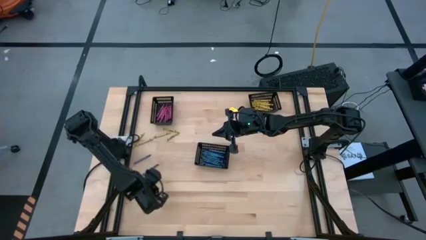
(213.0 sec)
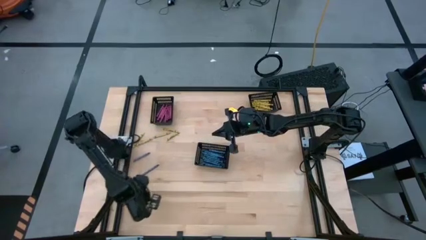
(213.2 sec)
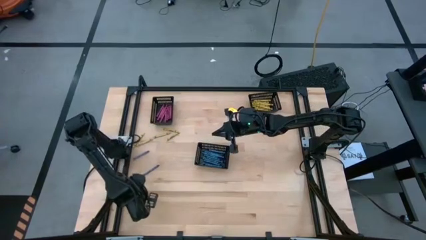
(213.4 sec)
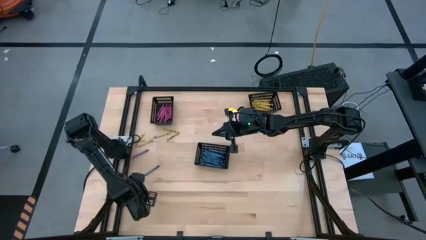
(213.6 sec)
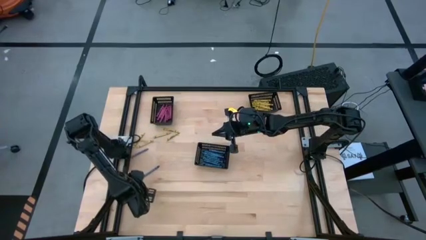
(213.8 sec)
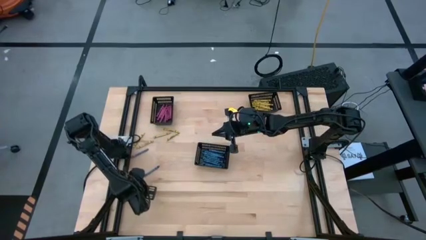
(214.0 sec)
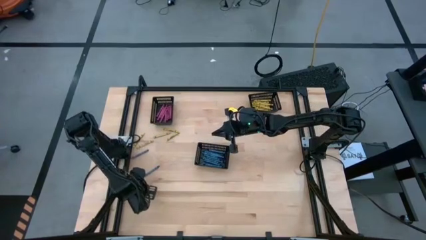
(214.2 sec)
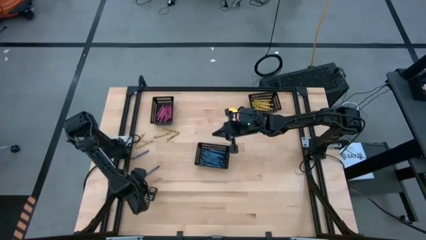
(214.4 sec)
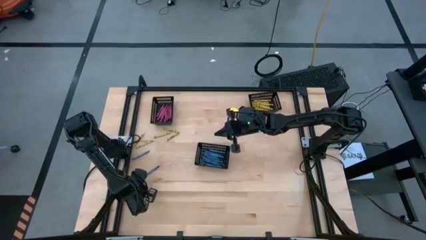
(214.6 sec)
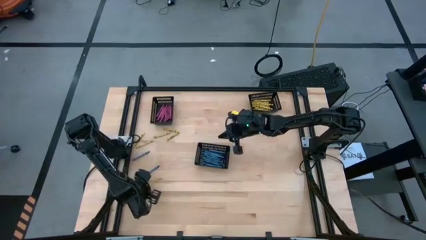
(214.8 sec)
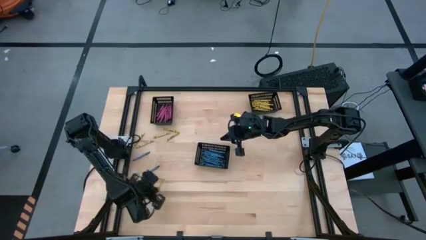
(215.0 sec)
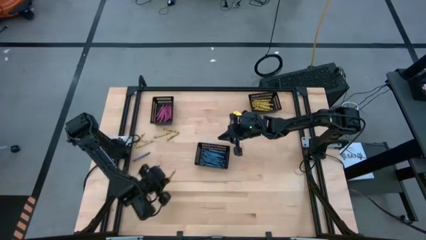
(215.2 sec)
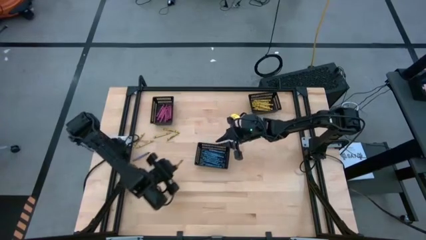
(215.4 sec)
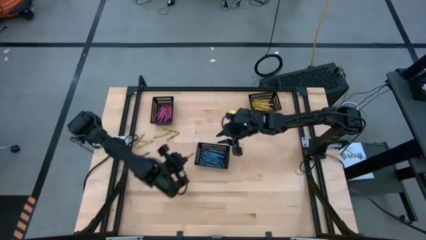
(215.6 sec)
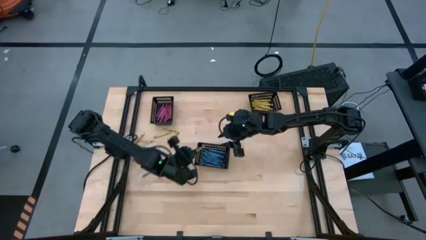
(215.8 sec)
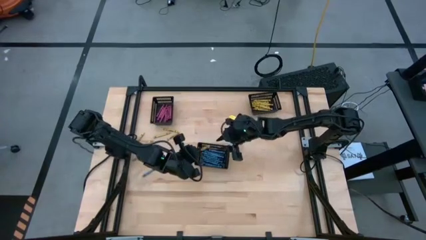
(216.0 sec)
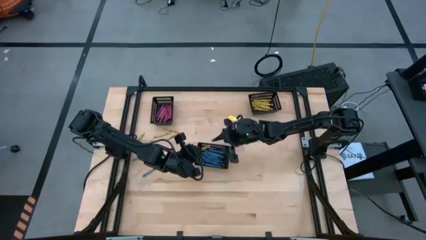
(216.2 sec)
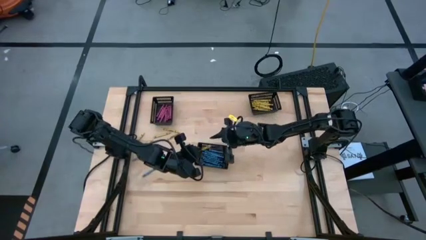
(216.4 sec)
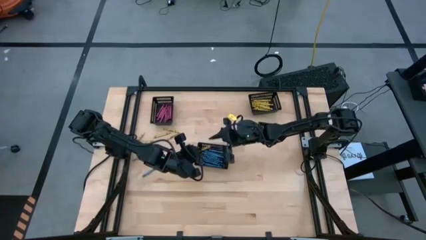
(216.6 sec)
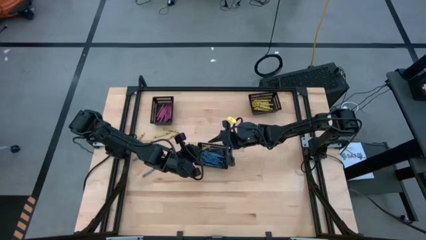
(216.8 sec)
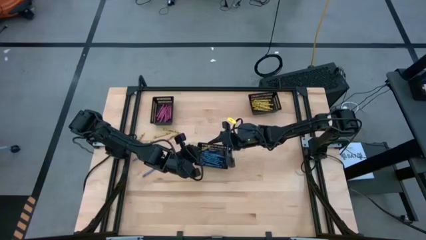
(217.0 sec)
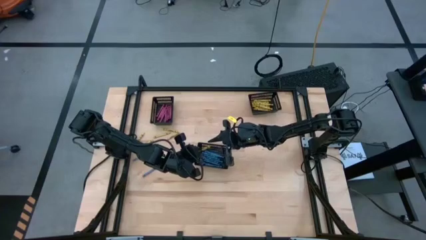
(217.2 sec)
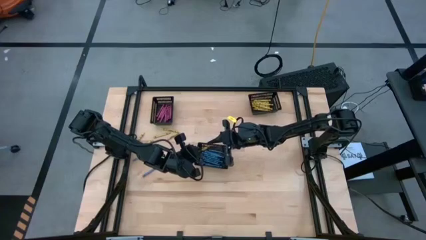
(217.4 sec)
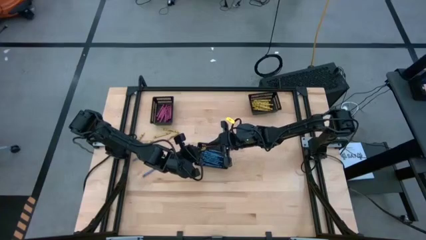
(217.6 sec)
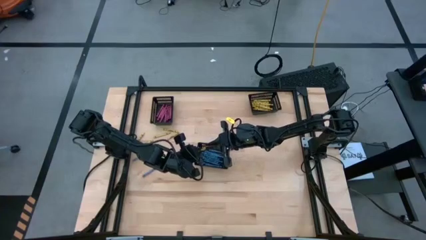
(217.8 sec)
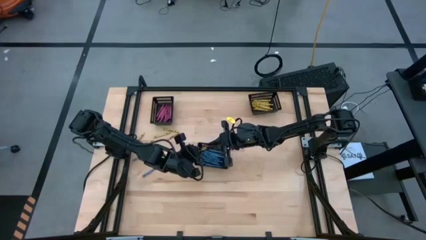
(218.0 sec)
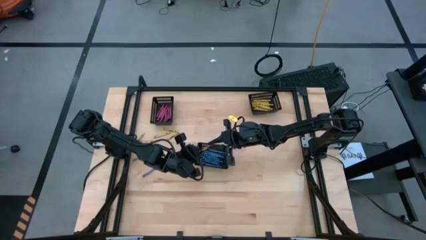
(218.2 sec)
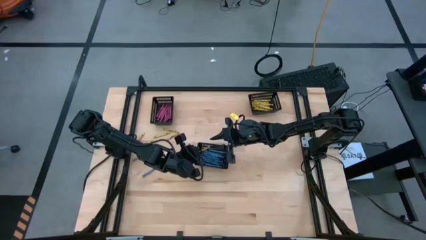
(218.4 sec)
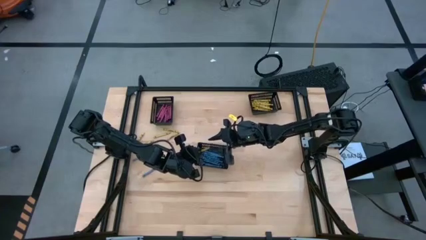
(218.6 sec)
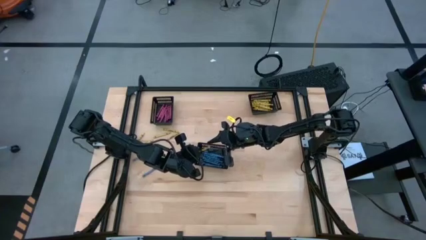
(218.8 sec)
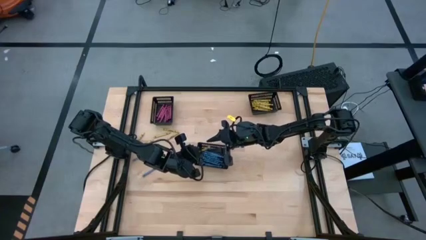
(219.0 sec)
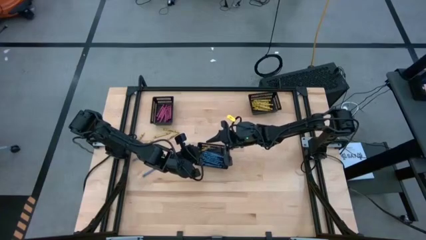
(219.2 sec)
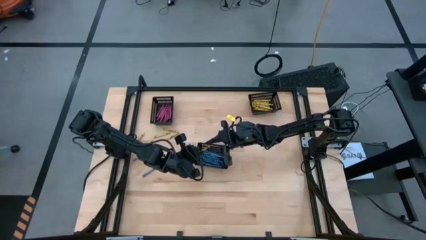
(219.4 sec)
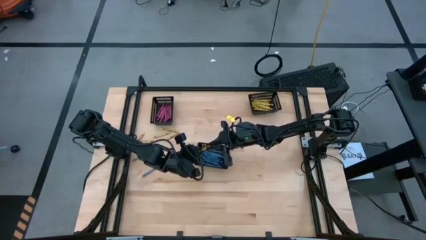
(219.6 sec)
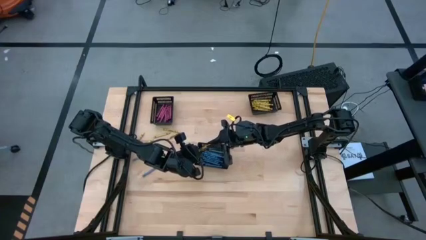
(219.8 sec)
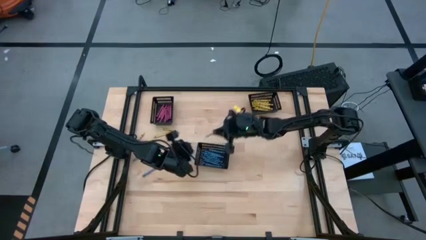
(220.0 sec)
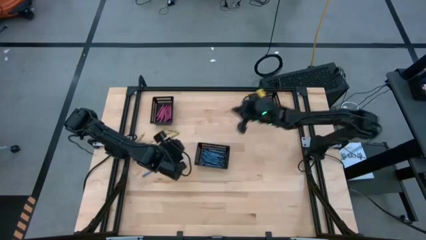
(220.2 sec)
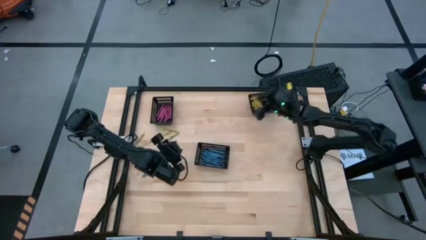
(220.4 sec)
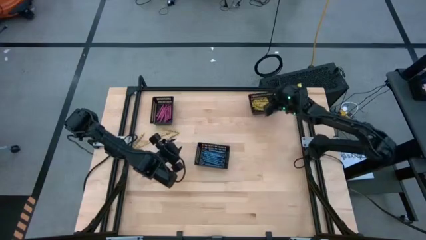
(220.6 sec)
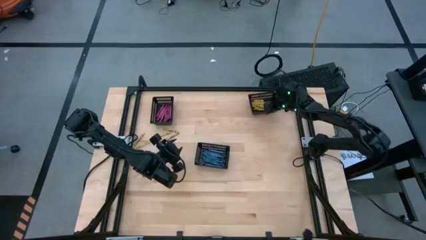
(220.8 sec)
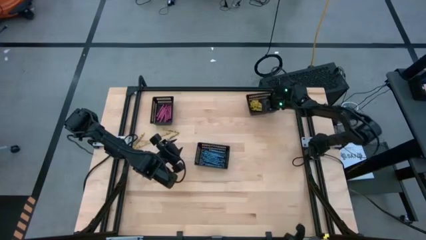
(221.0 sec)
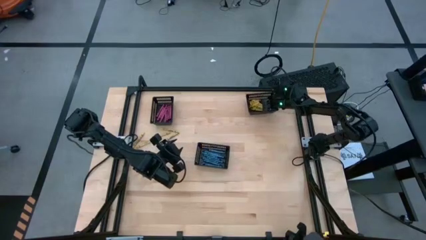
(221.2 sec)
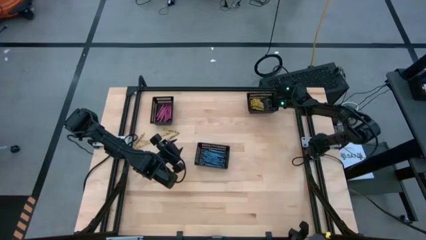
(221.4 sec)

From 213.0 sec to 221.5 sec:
Task: Sort crayons
Put the yellow crayon into the top right black bin

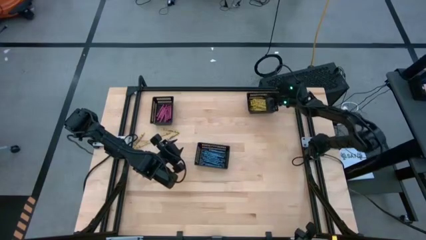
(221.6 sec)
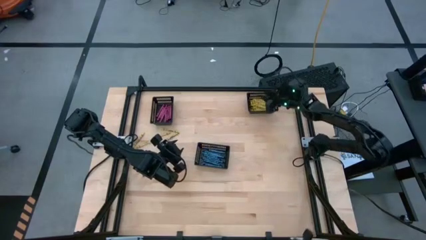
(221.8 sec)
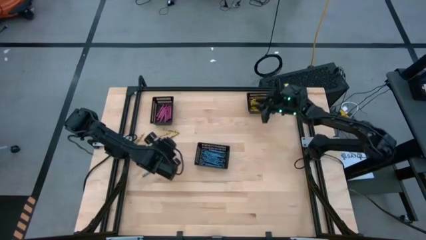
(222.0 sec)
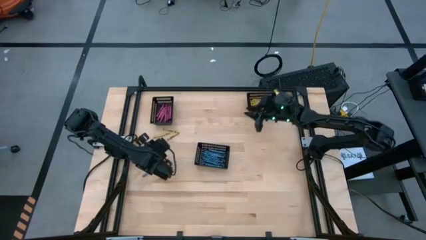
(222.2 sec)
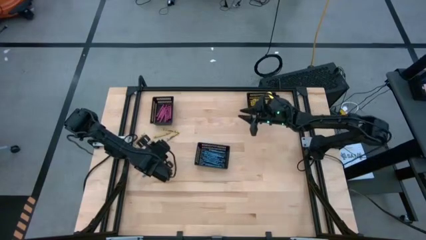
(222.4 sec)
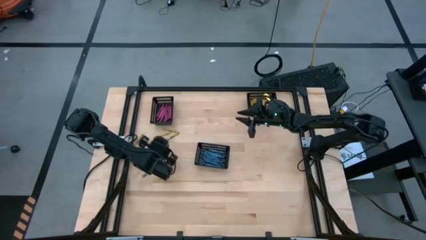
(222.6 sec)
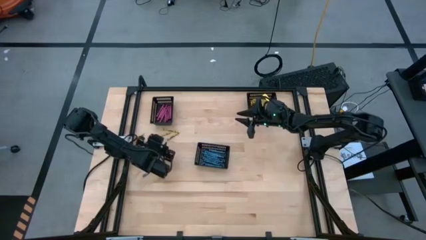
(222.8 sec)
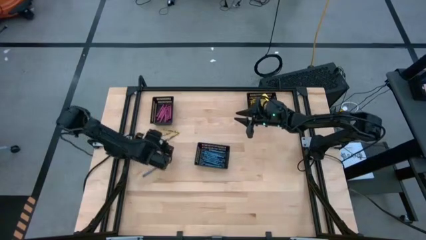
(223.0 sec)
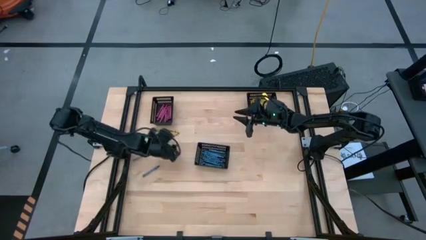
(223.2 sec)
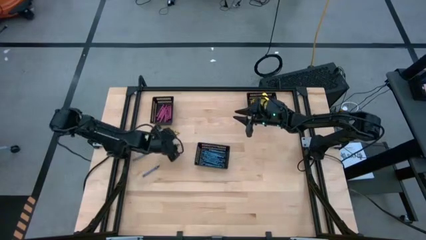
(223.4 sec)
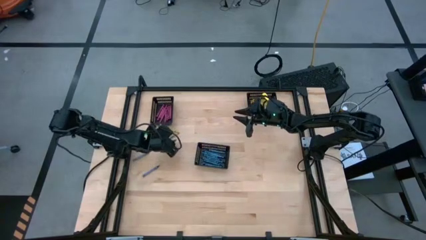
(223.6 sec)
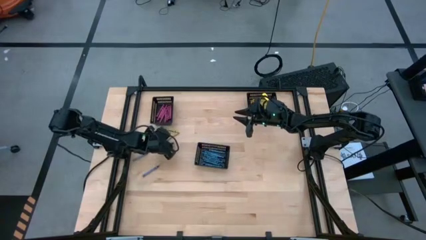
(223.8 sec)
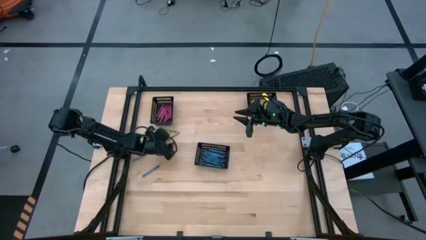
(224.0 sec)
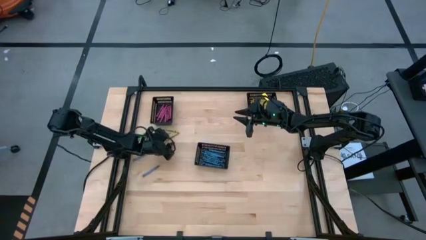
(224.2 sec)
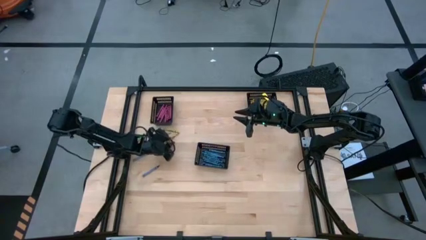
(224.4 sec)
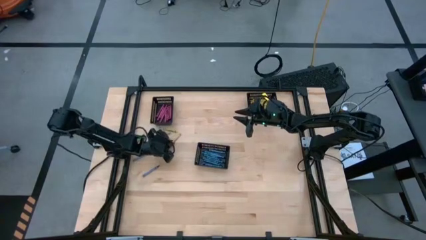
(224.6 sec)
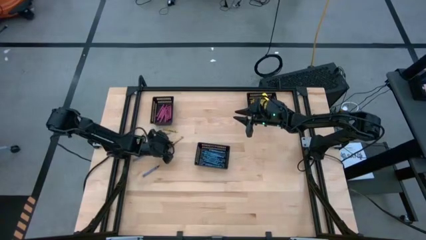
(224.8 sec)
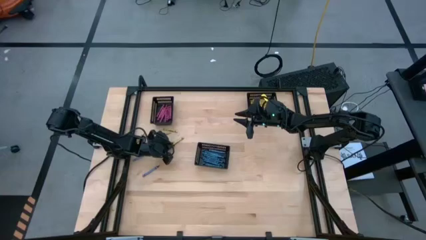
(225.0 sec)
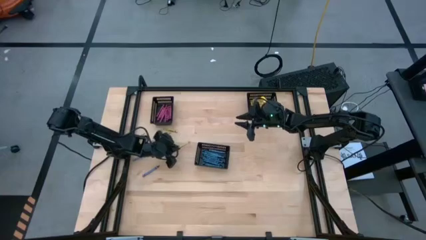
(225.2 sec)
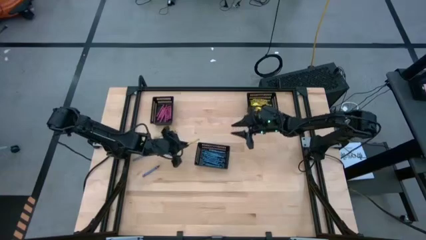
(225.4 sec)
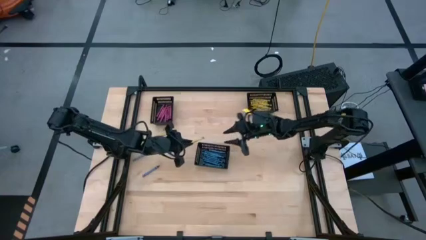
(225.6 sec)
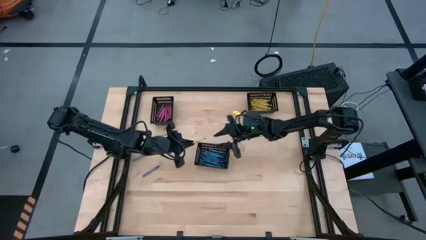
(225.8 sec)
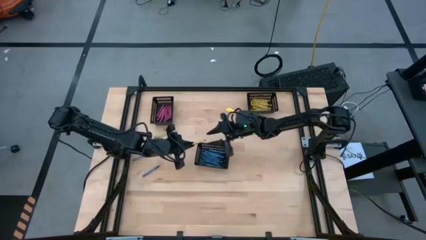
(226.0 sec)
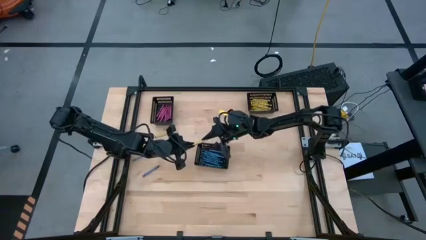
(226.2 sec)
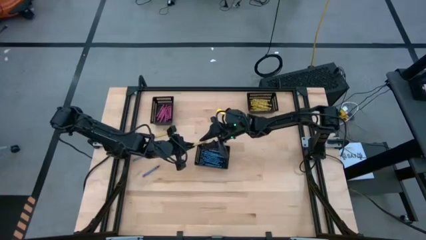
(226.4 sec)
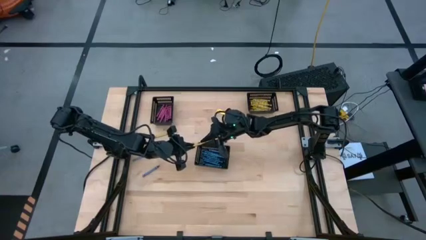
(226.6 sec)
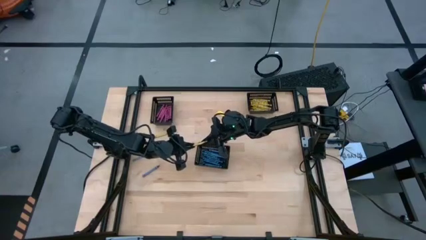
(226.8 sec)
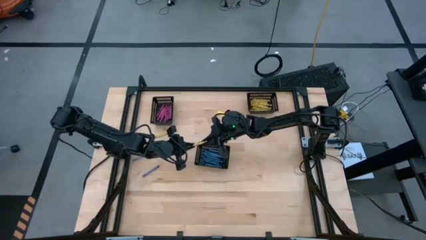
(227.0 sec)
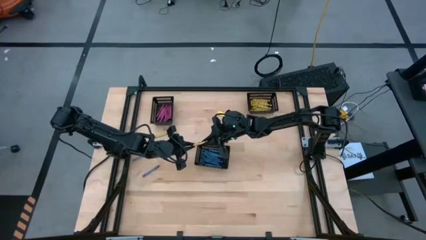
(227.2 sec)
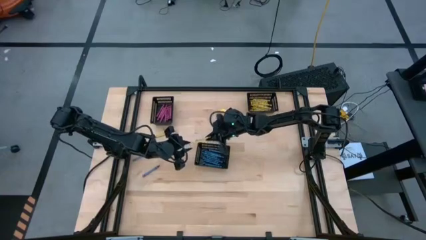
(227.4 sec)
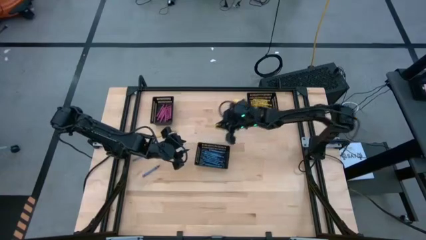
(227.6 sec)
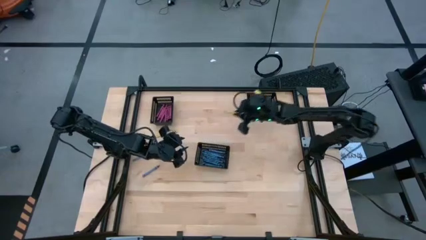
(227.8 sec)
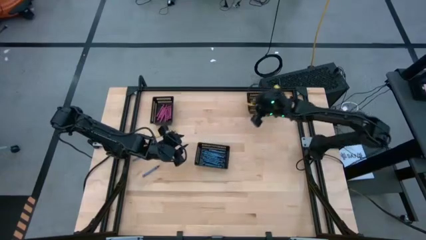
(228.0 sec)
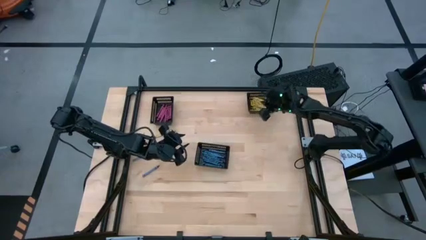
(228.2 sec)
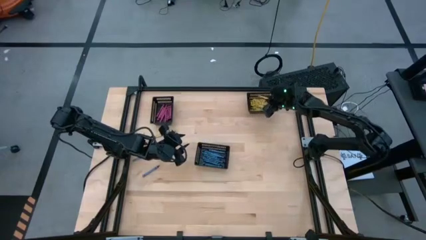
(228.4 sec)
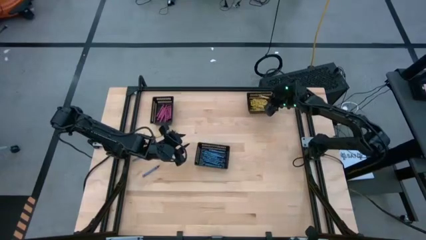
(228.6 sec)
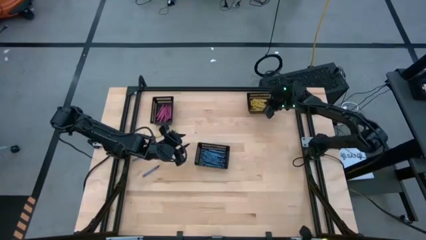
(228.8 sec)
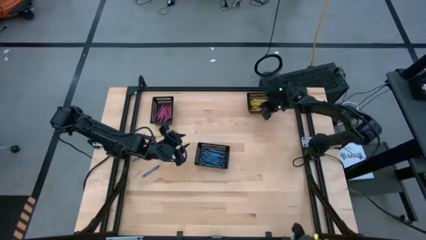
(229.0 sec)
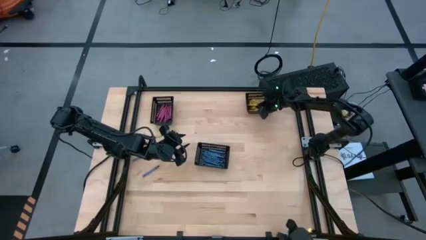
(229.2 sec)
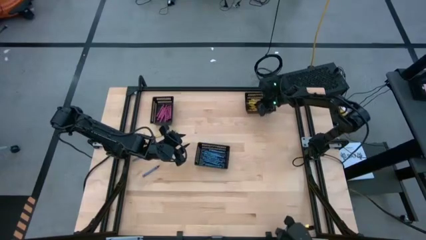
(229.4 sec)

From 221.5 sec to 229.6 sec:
Put the yellow crayon into the top right black bin
